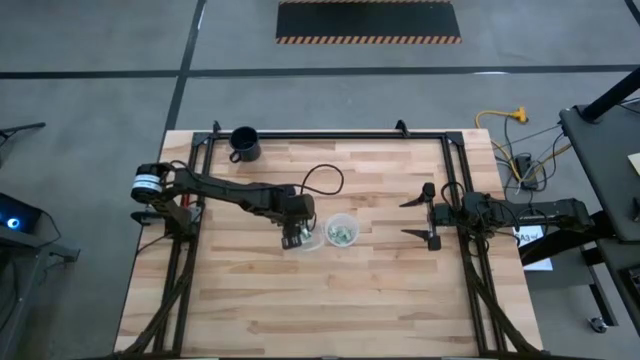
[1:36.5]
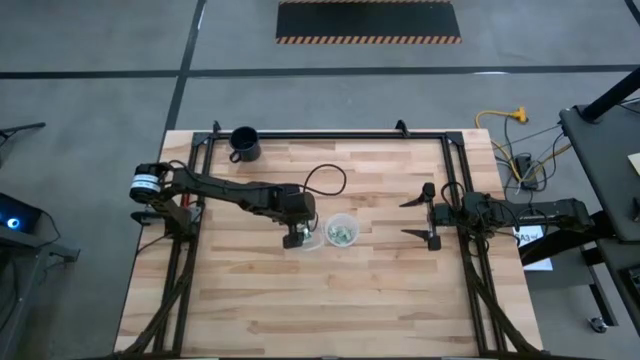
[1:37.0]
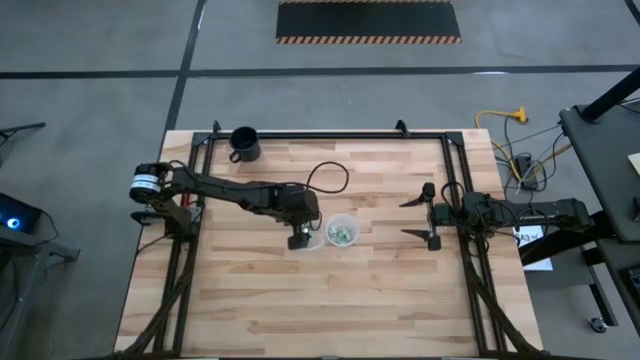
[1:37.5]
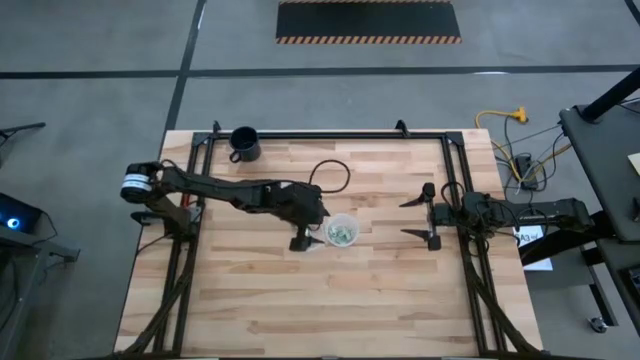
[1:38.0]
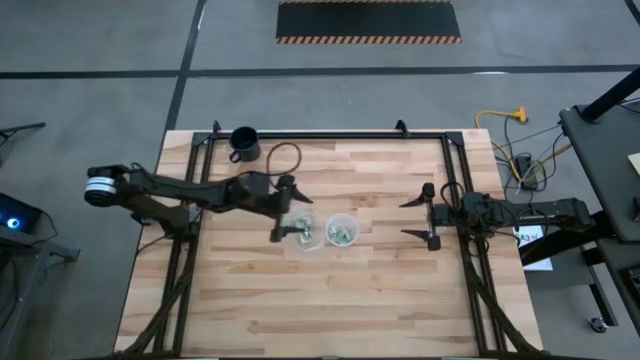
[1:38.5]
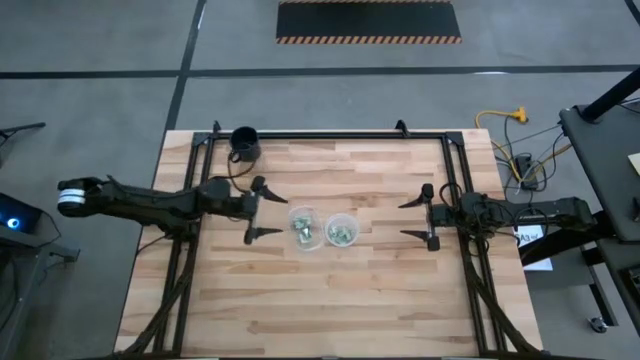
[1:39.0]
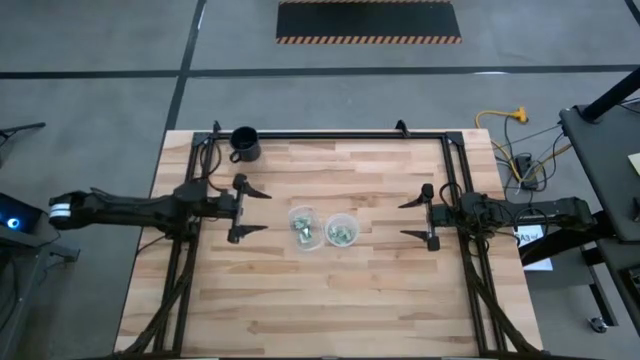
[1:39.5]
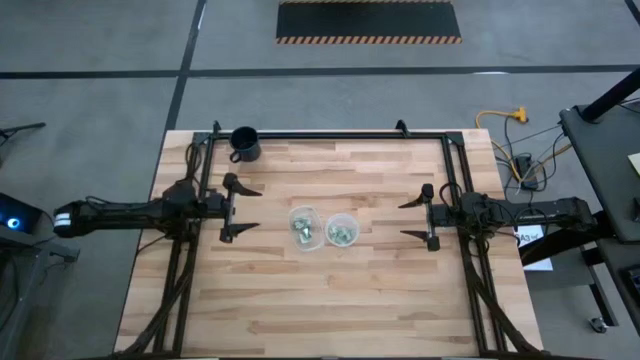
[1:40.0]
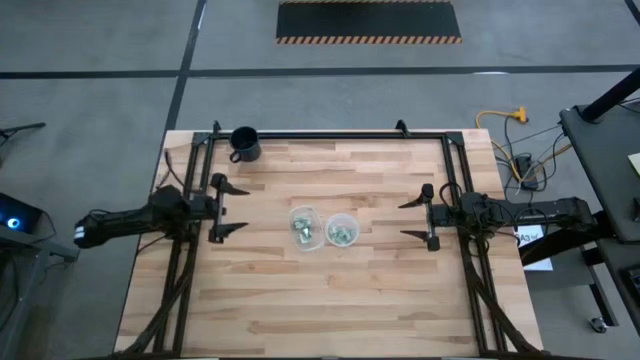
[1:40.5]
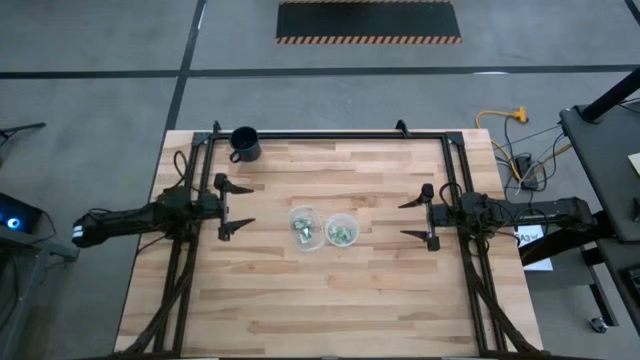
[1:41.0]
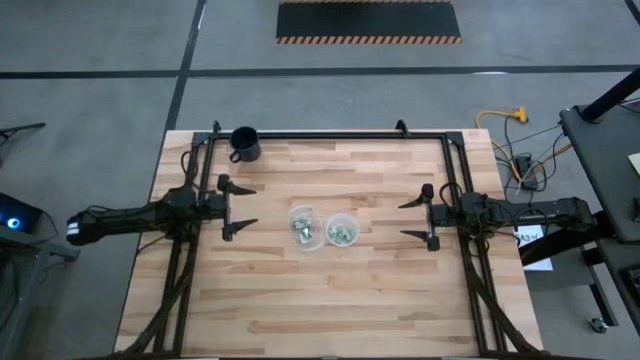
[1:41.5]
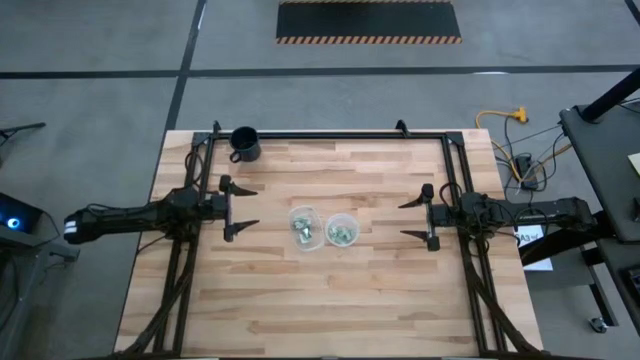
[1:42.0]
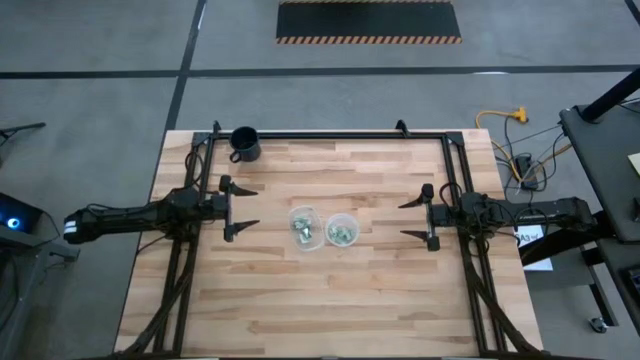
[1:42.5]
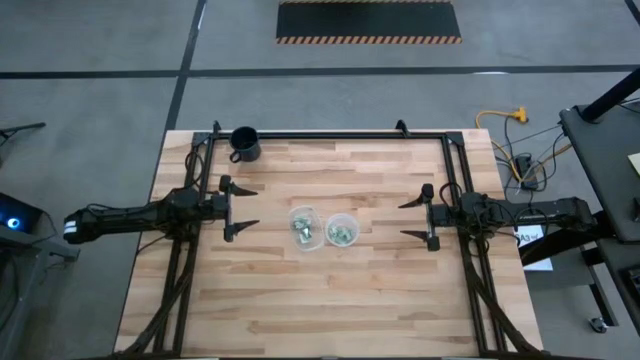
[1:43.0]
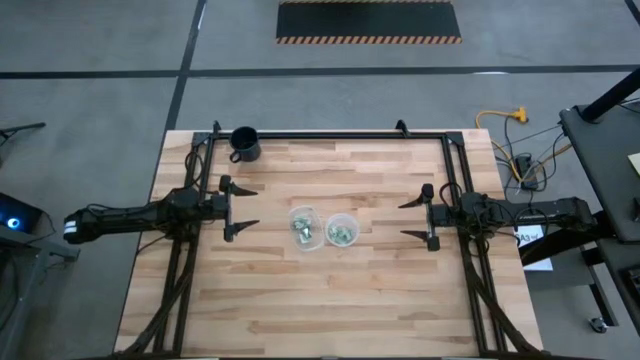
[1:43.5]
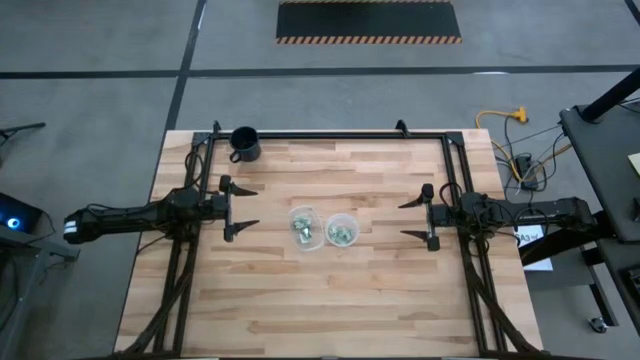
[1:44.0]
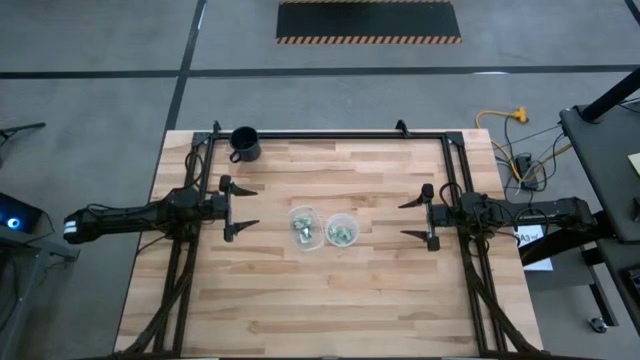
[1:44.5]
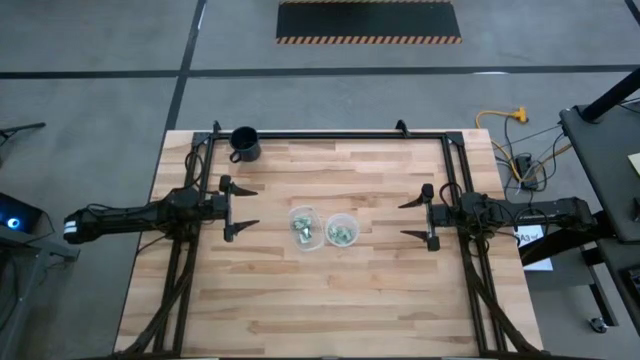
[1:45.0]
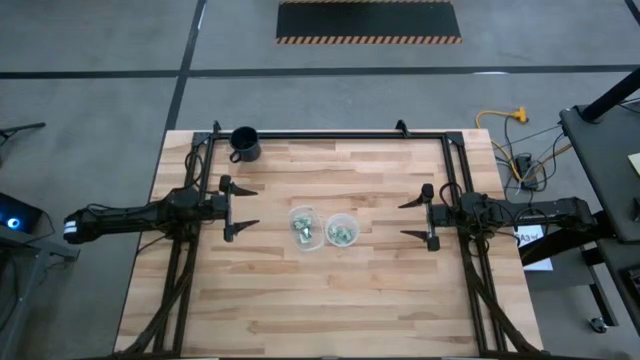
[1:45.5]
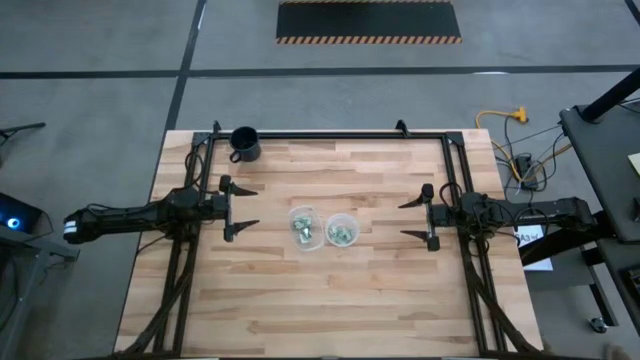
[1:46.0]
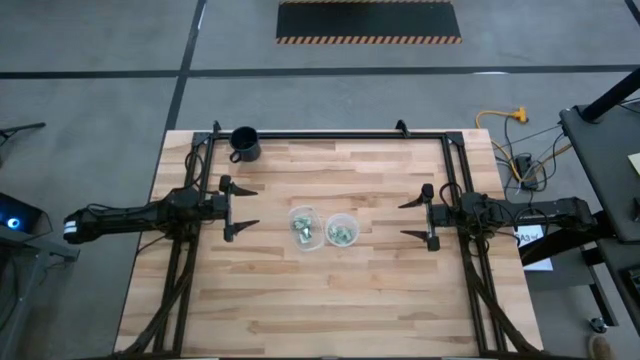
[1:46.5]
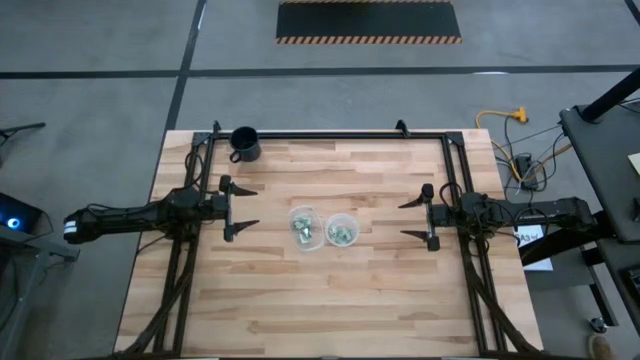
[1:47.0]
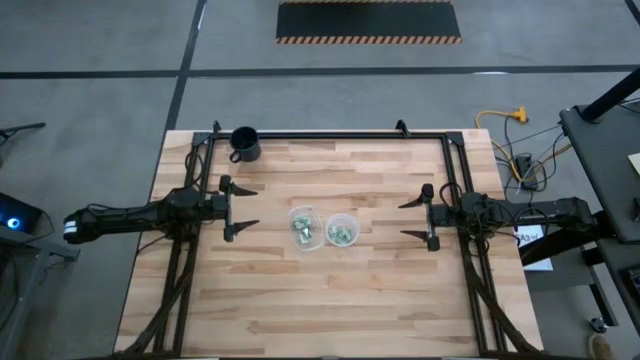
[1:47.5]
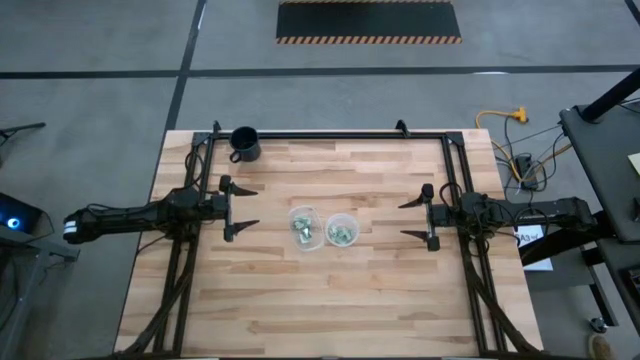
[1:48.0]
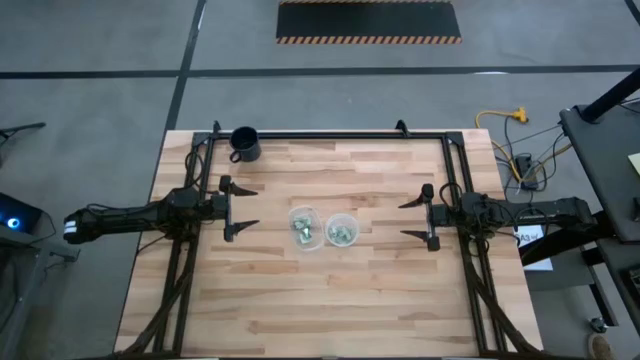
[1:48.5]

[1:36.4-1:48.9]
Task: Pick and place Stevia / Truvia into bins
Return to Home Position

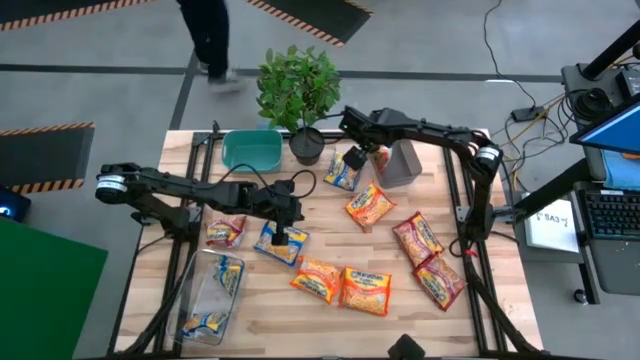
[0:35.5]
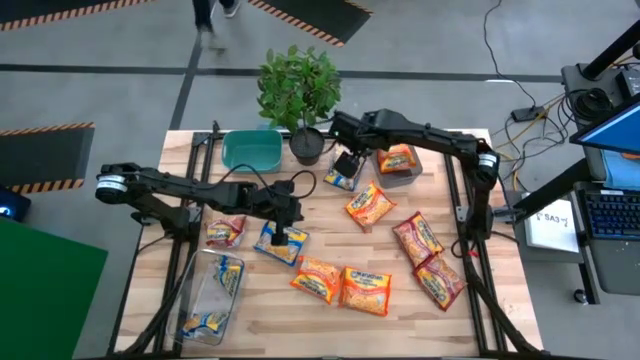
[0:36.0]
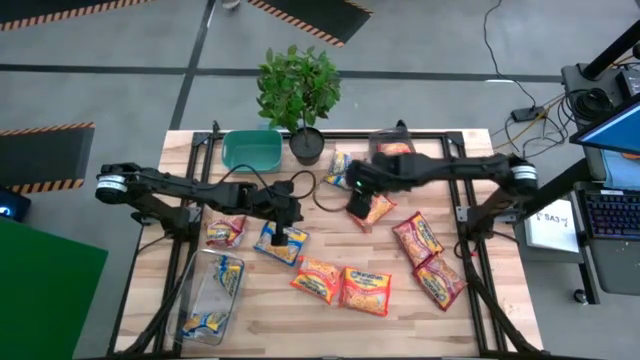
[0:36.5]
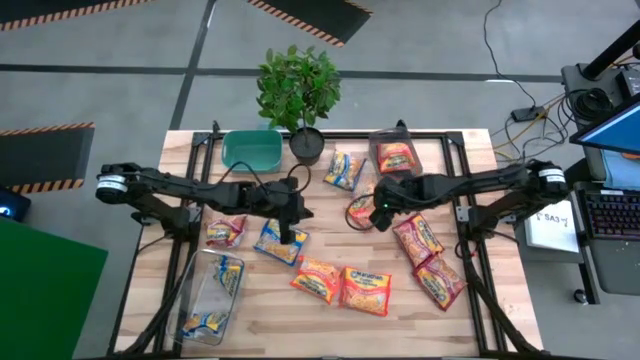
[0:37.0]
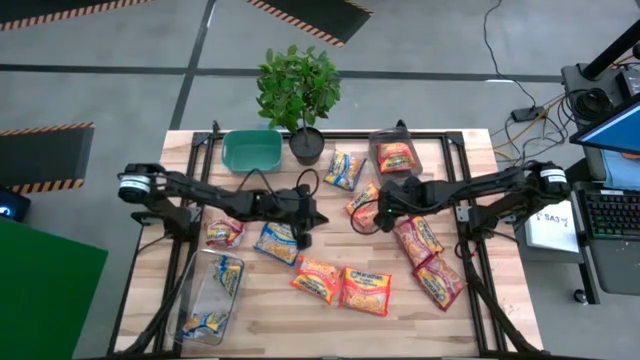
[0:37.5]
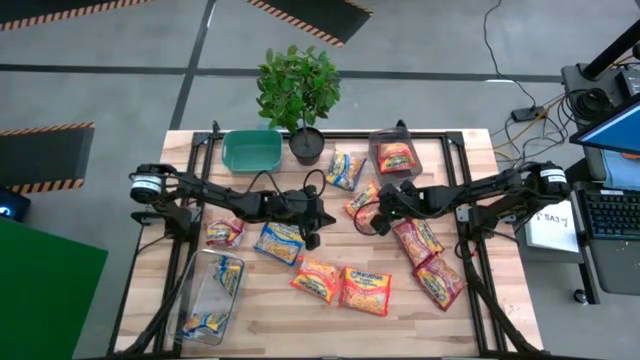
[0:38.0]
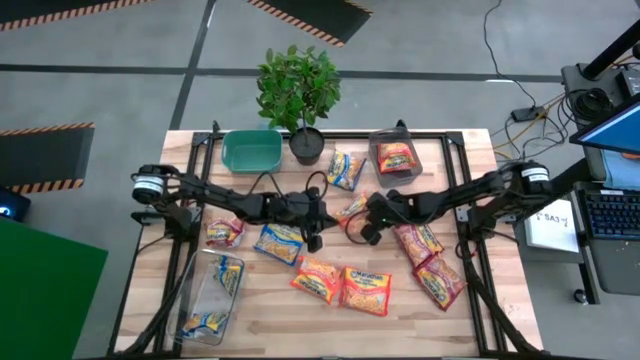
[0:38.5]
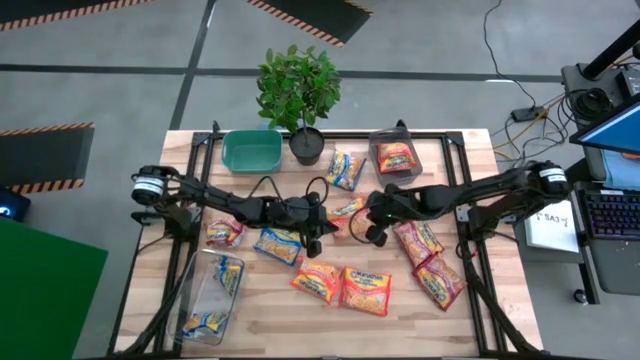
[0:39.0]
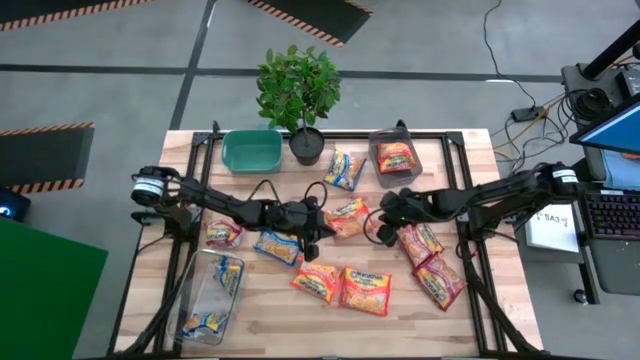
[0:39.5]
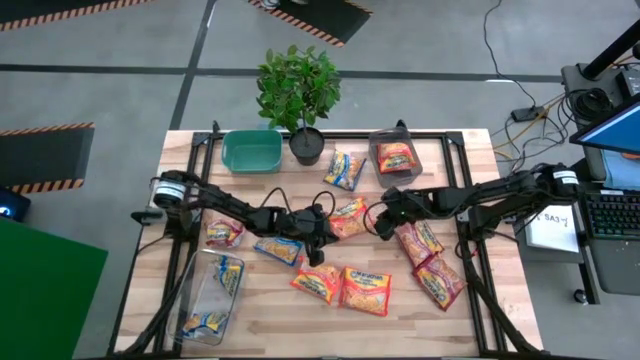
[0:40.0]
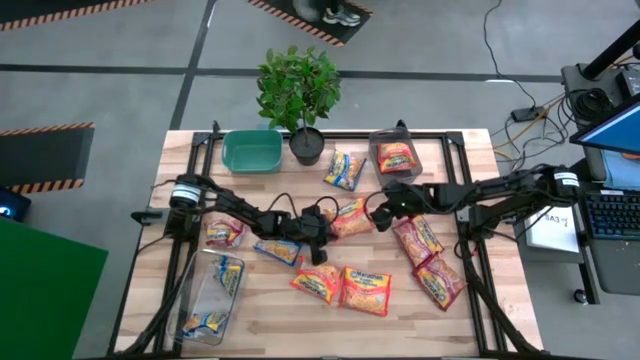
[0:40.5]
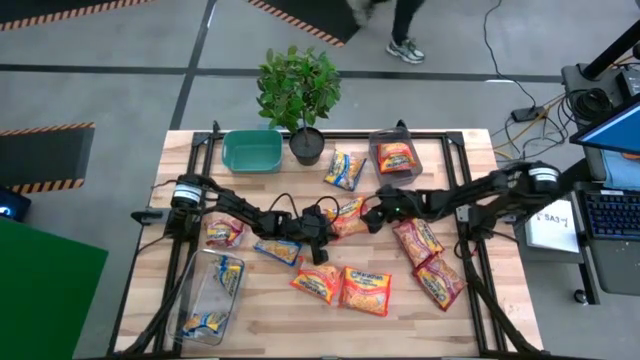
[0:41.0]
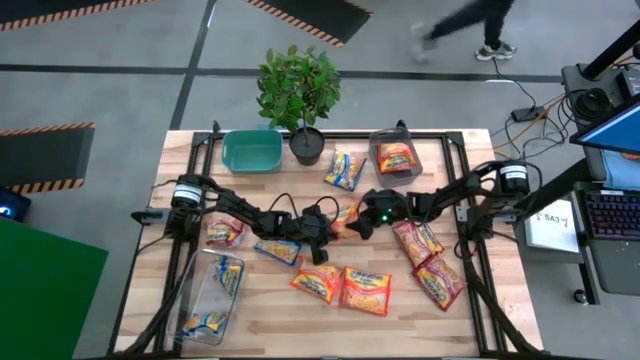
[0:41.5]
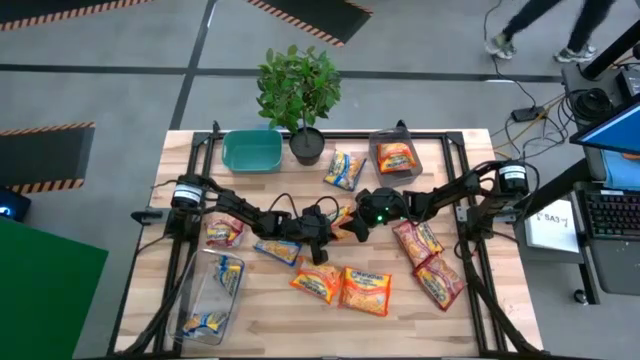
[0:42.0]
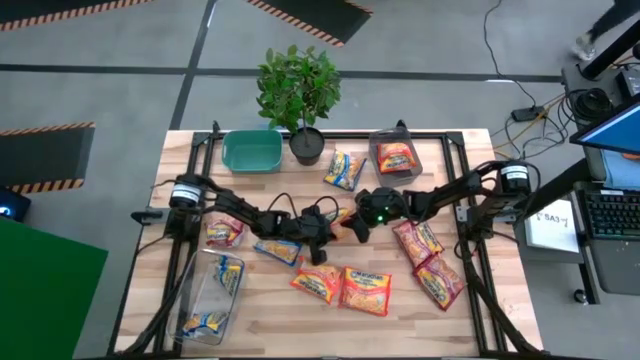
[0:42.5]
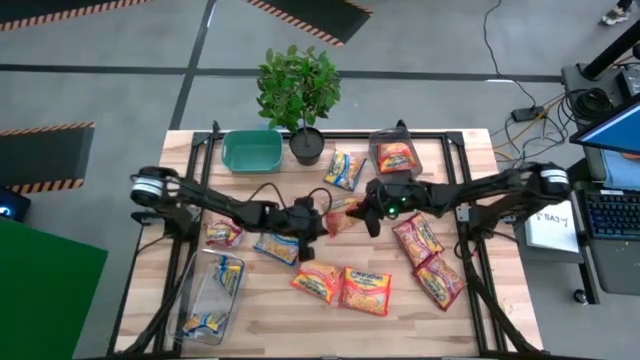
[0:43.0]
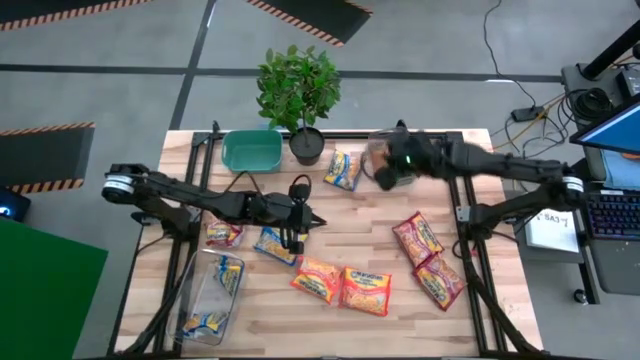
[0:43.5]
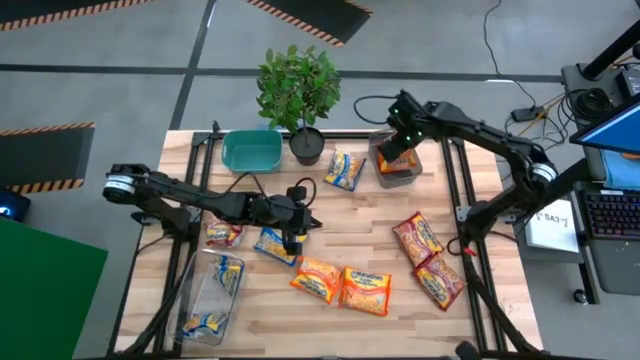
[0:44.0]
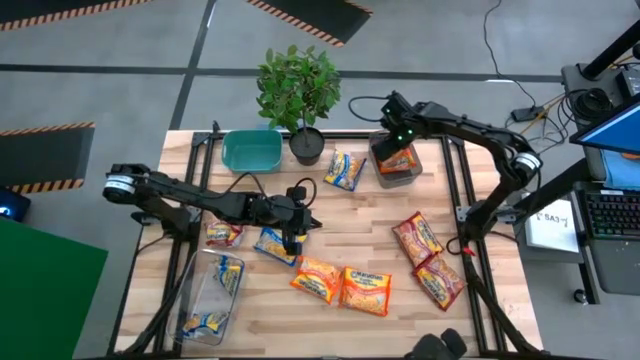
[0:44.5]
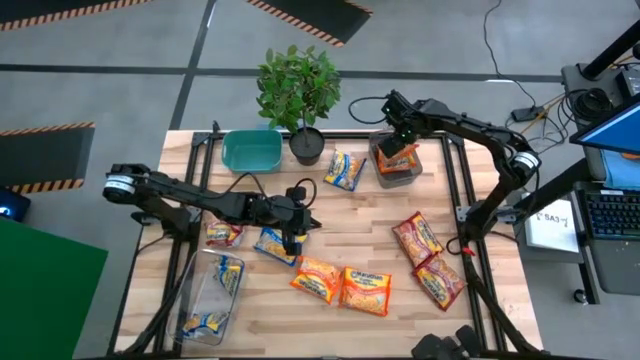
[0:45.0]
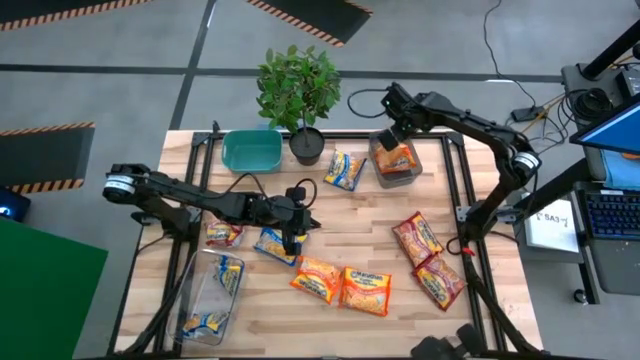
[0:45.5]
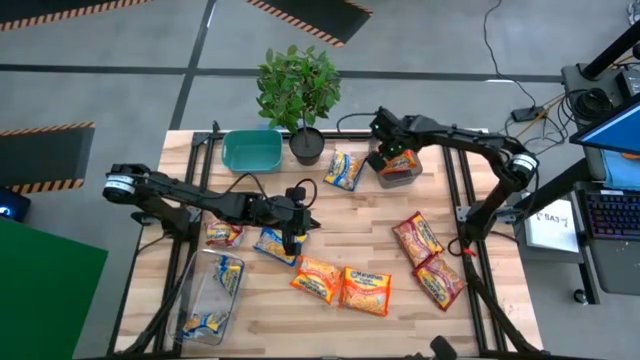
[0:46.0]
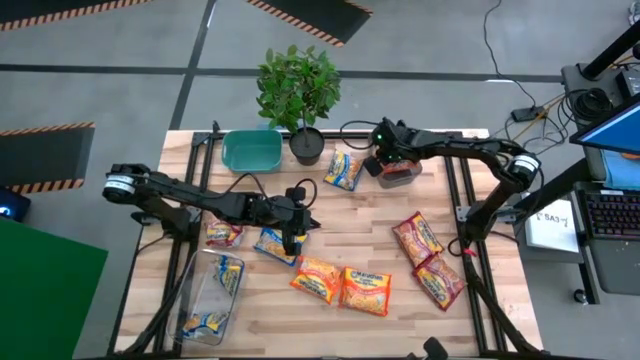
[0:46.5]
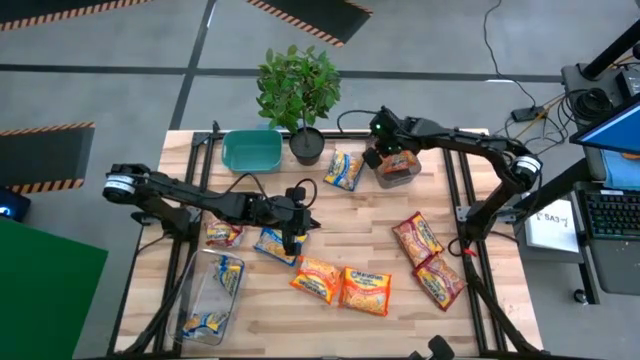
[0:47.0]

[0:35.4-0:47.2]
Task: Sort Maruchan noodles
Put the orange noodle pack into the black bin
